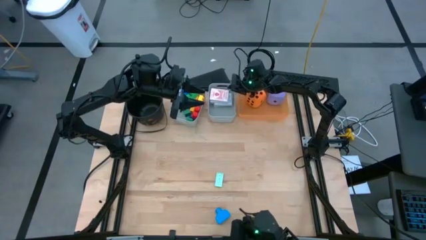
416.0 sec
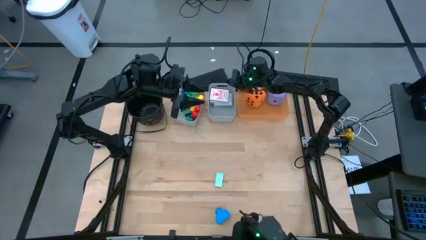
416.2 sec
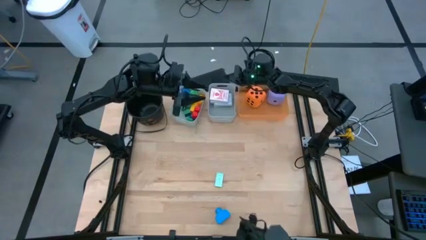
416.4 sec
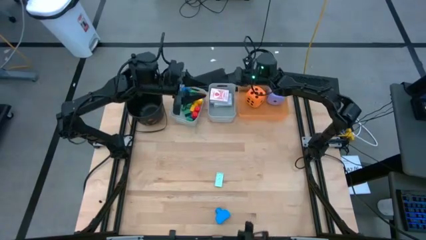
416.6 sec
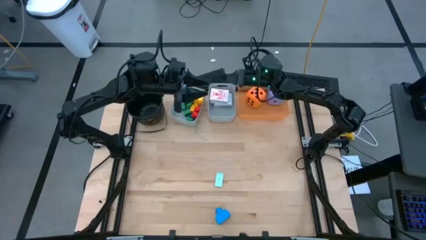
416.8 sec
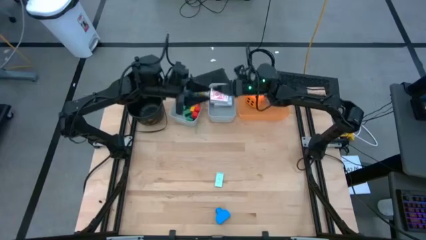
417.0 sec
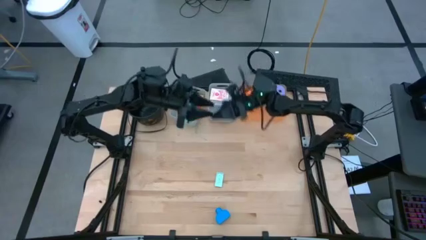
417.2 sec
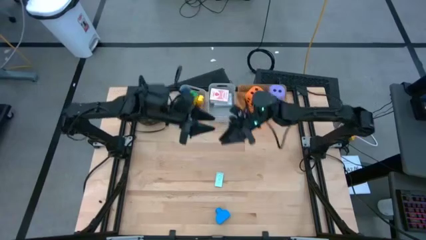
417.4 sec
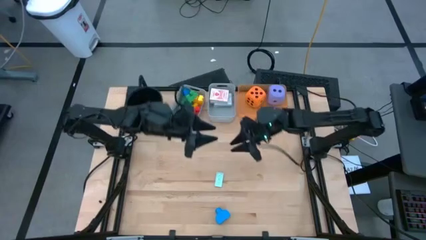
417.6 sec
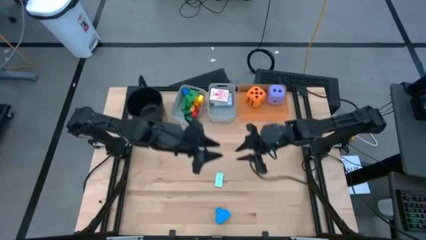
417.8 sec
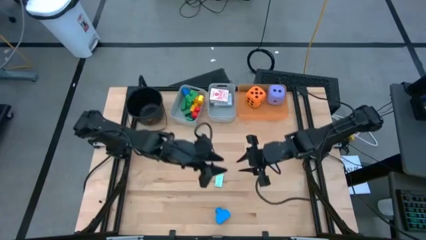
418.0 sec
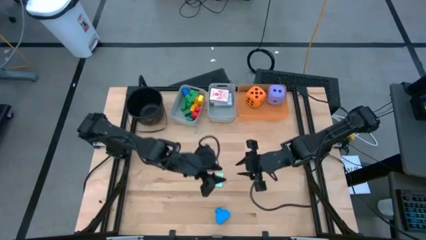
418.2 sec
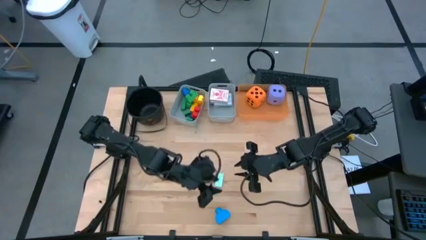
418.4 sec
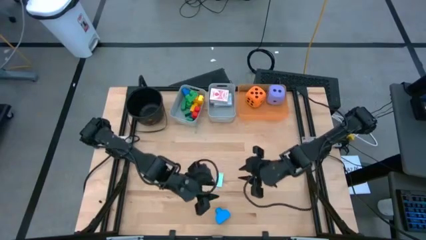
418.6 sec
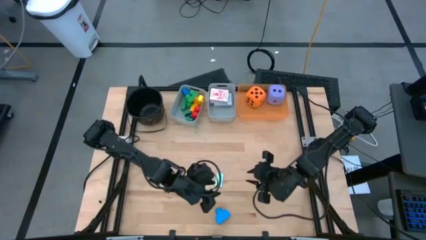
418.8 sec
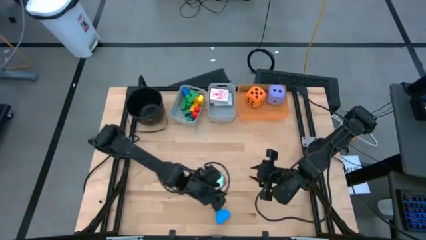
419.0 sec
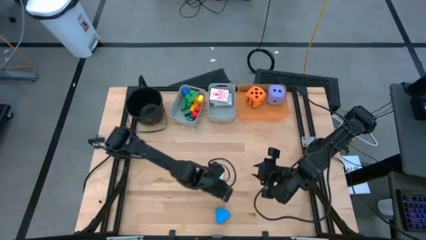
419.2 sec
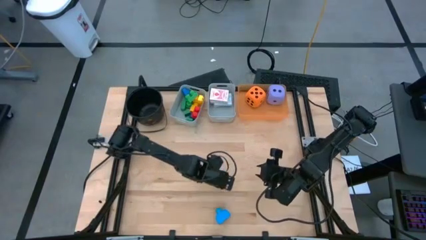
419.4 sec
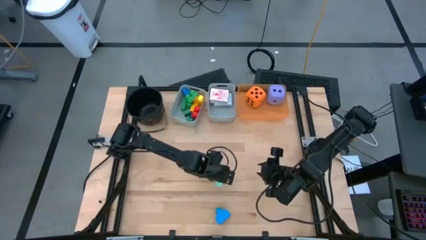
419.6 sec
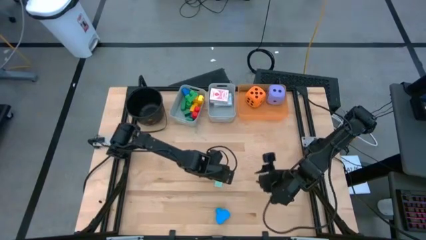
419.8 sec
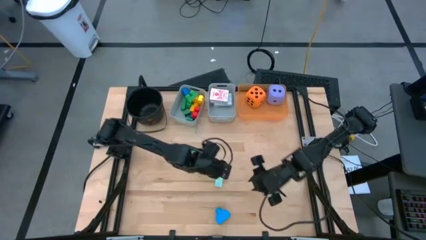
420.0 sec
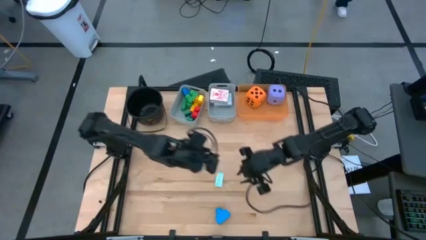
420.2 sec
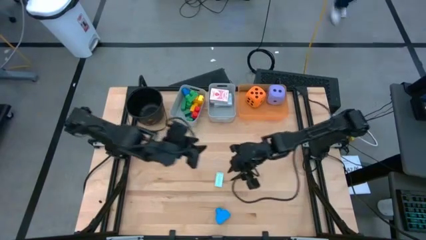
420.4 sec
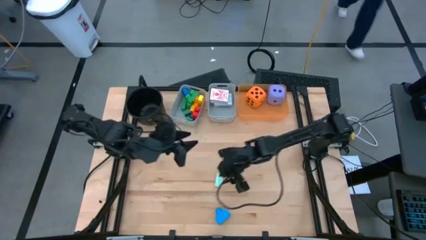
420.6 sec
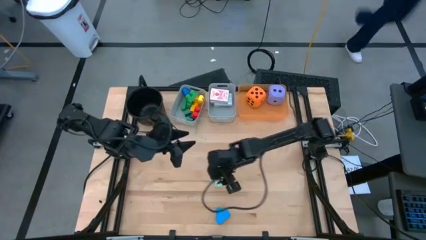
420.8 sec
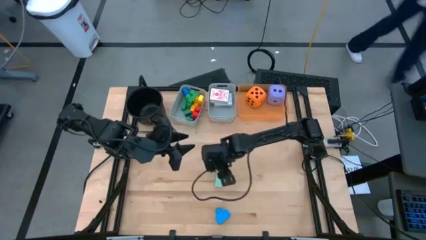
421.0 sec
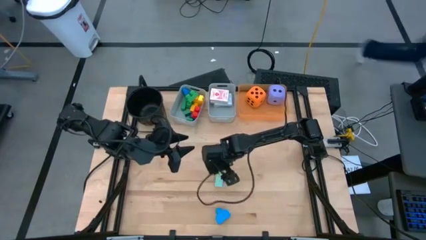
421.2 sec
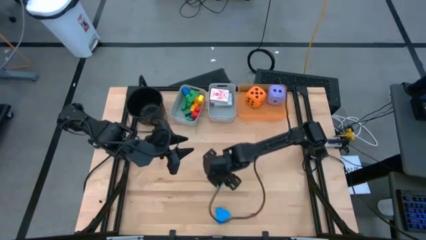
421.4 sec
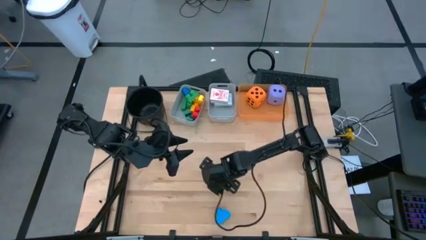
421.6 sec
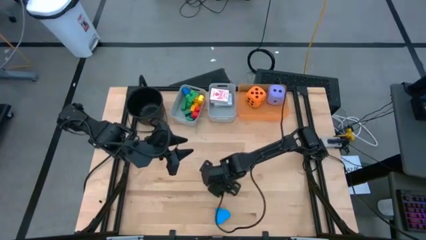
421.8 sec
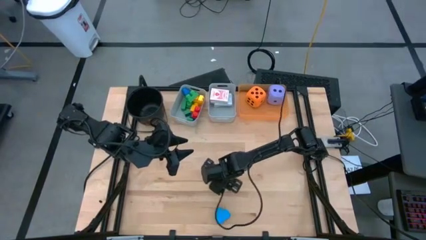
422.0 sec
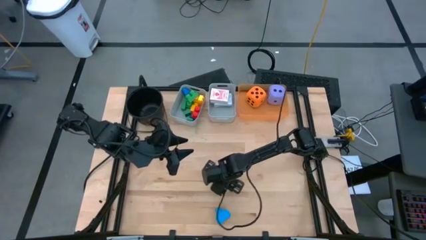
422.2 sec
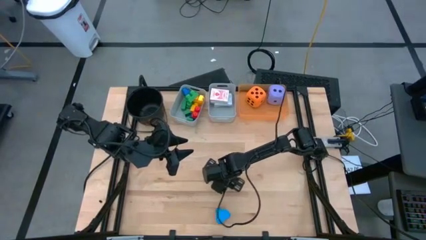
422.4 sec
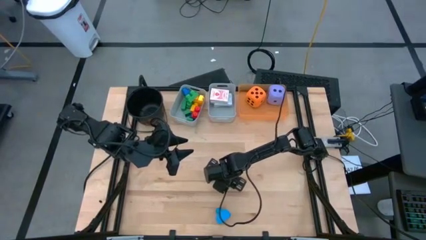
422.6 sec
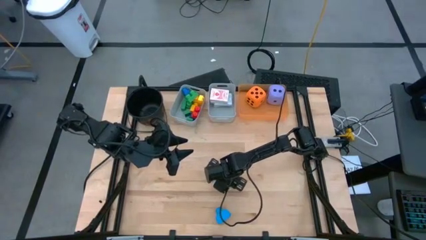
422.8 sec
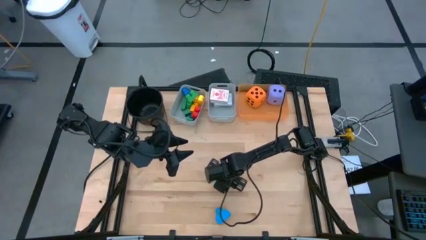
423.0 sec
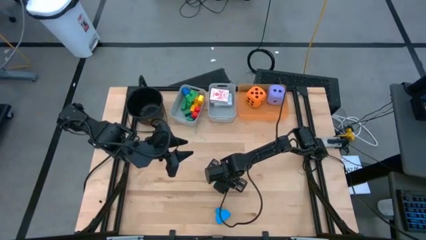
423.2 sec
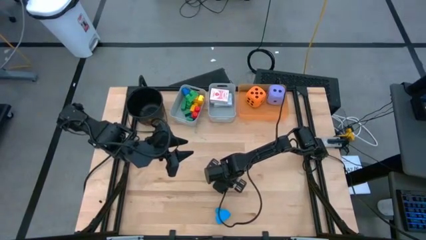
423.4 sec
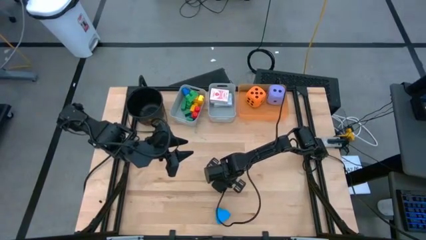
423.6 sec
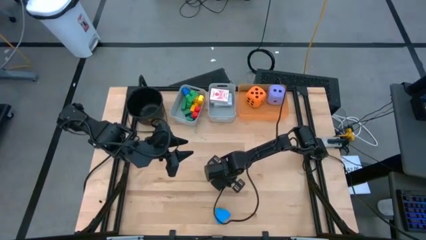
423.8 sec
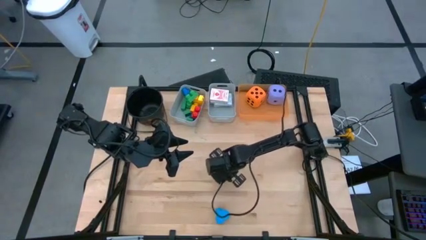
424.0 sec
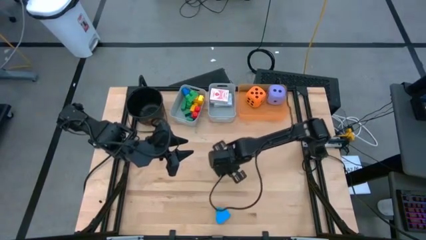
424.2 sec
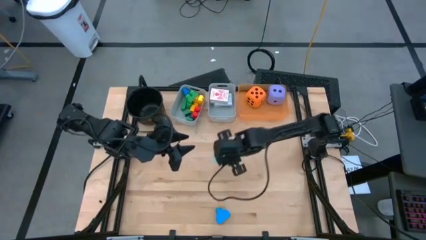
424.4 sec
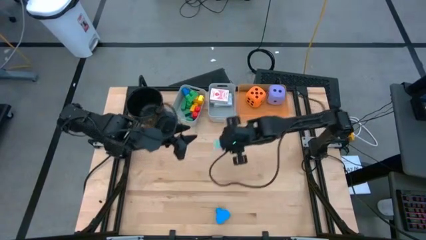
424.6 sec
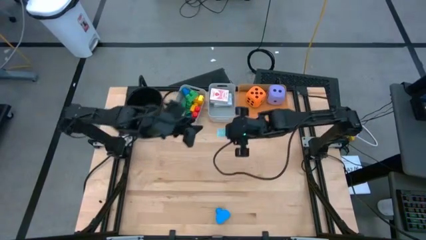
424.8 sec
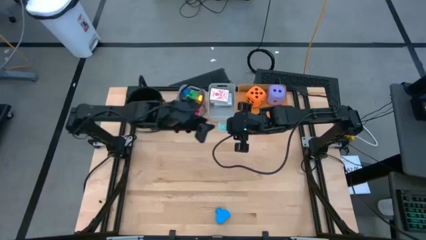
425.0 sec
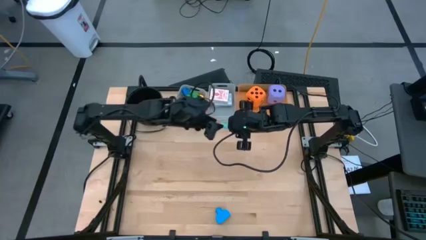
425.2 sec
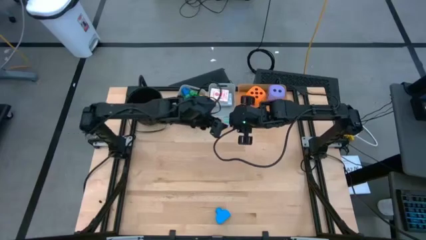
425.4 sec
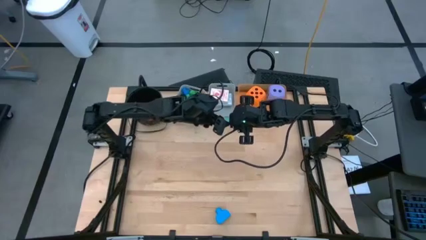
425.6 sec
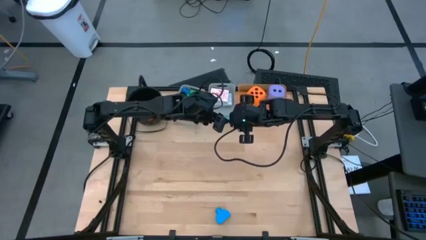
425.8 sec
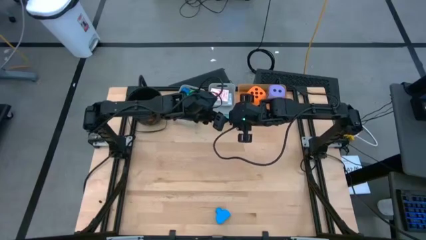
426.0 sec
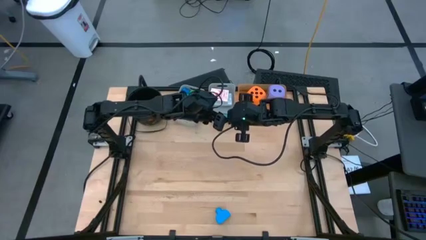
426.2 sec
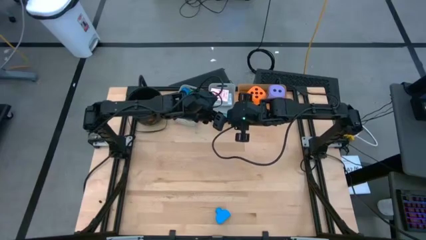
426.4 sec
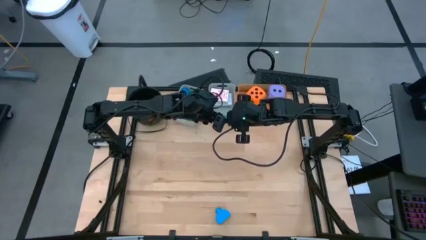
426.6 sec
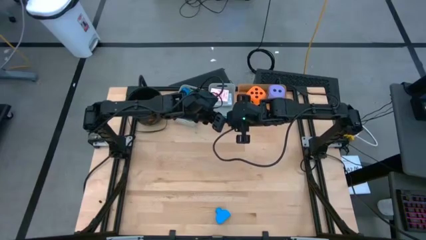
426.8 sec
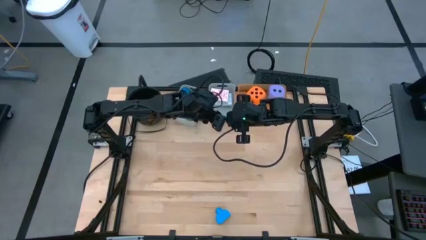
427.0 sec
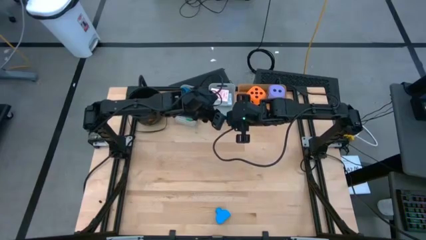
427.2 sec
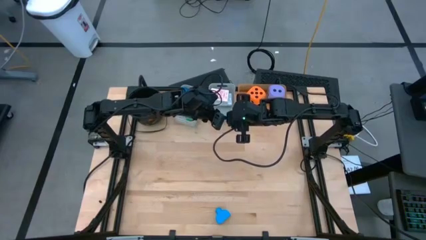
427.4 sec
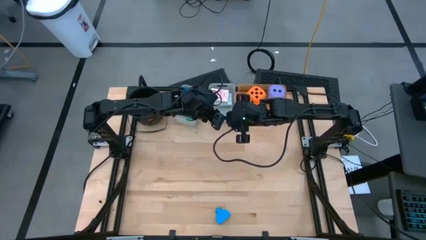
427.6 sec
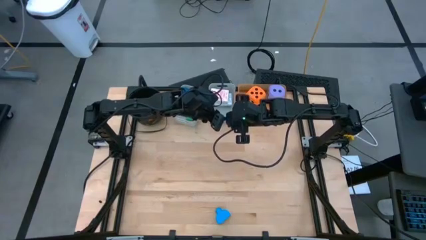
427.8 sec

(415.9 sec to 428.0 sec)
Task: Pick & Place Toys
Put the light blue game piece into the left gray bin
